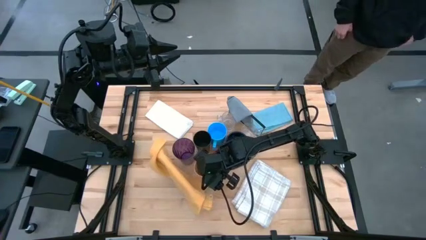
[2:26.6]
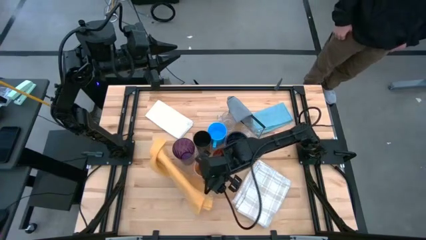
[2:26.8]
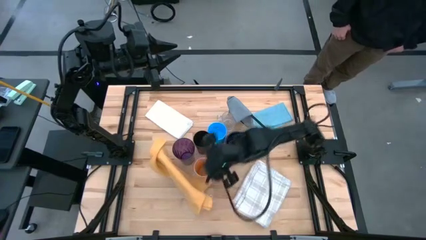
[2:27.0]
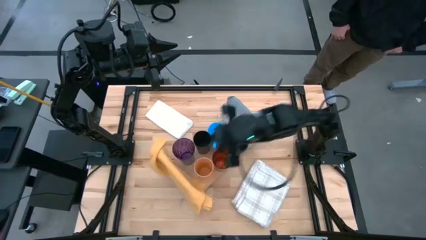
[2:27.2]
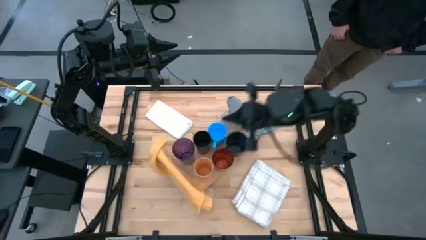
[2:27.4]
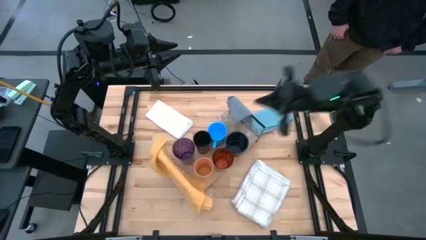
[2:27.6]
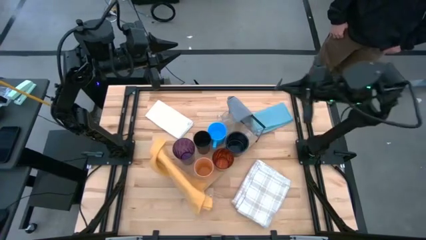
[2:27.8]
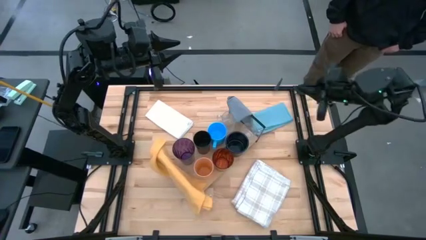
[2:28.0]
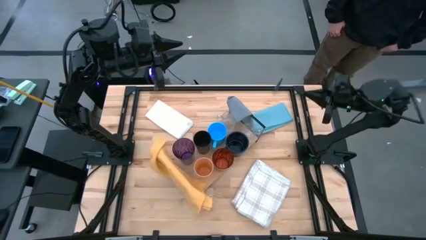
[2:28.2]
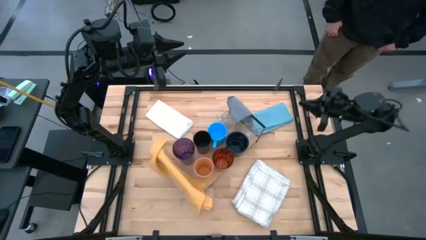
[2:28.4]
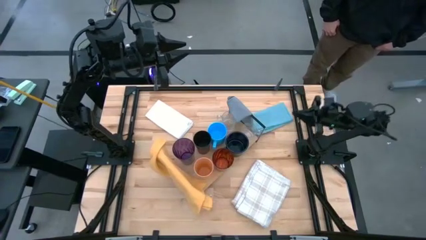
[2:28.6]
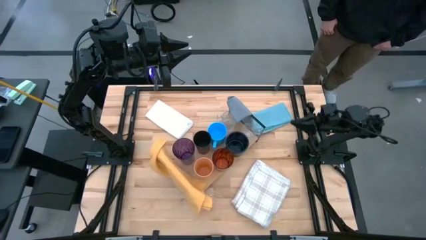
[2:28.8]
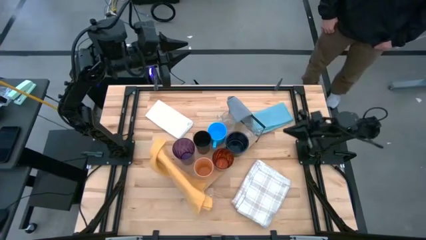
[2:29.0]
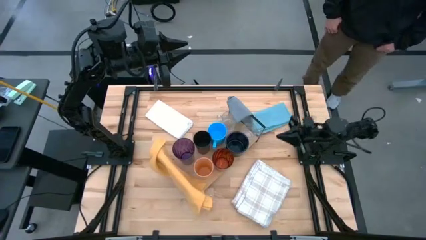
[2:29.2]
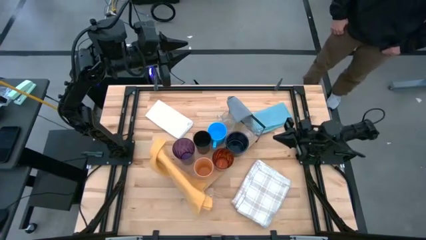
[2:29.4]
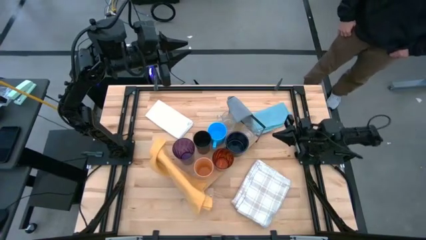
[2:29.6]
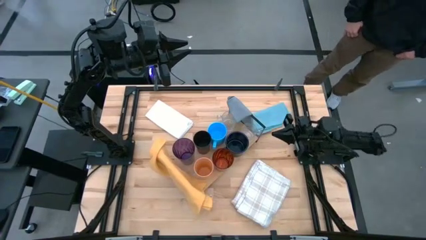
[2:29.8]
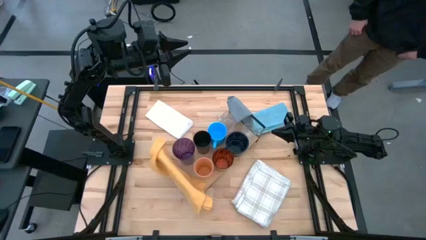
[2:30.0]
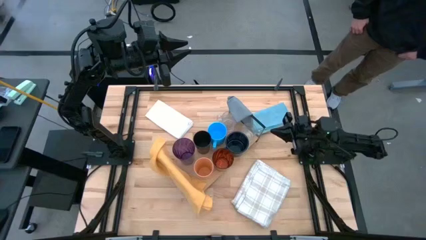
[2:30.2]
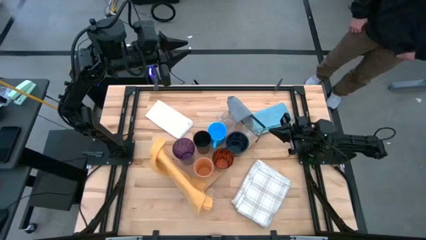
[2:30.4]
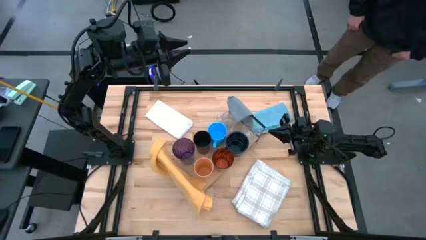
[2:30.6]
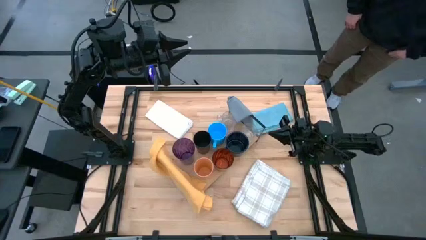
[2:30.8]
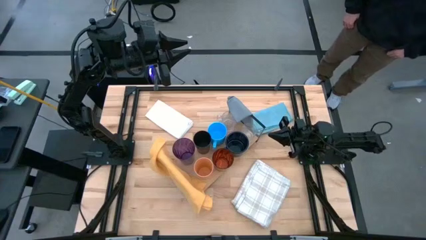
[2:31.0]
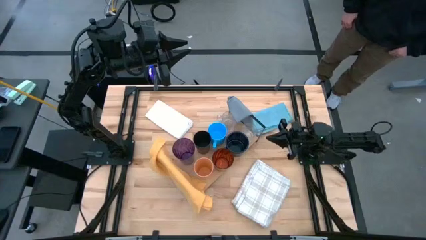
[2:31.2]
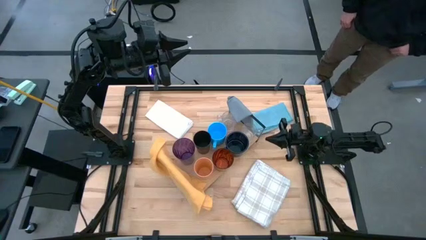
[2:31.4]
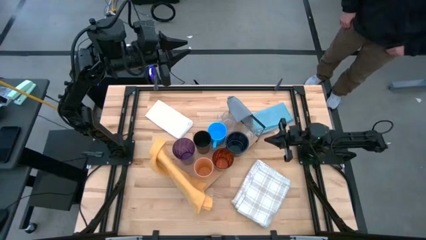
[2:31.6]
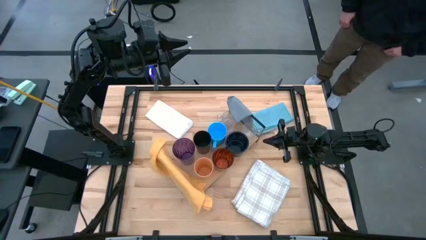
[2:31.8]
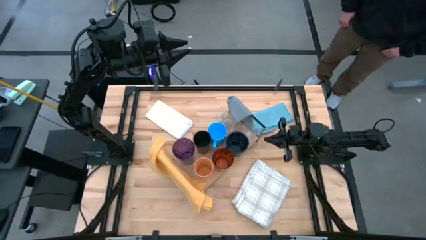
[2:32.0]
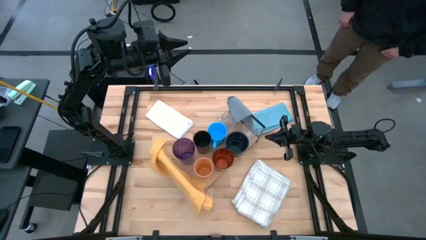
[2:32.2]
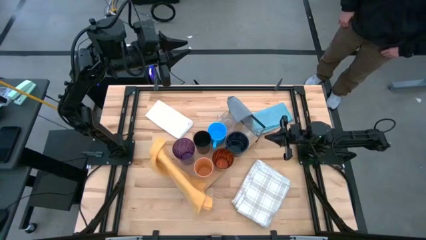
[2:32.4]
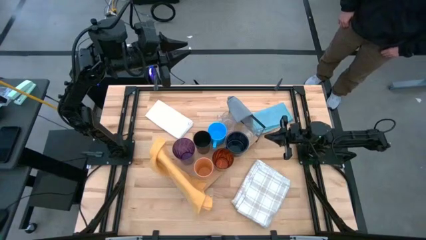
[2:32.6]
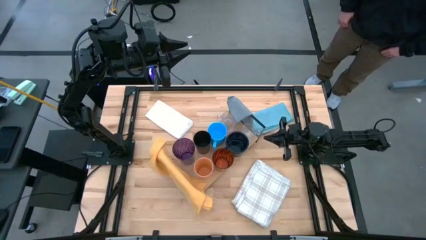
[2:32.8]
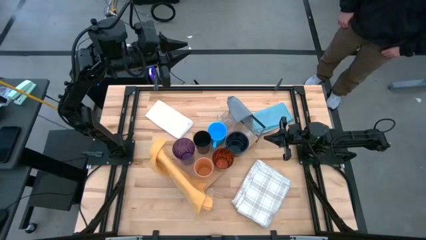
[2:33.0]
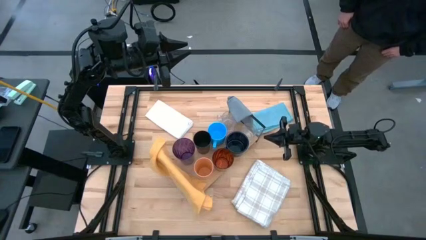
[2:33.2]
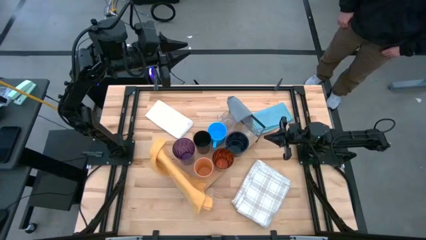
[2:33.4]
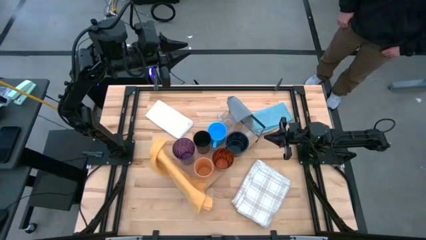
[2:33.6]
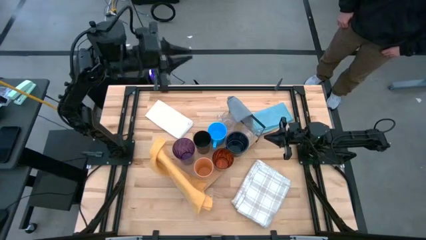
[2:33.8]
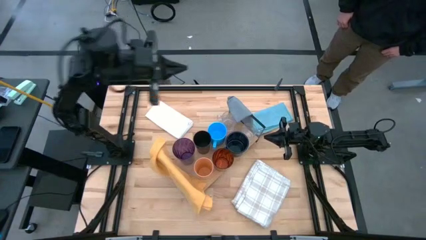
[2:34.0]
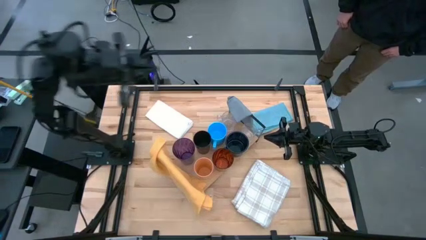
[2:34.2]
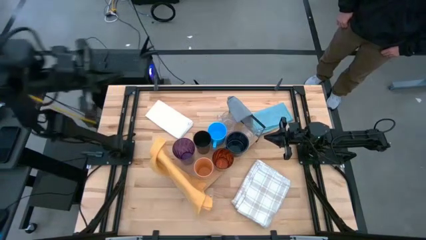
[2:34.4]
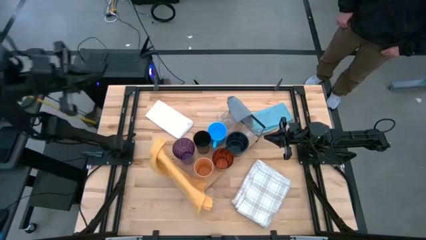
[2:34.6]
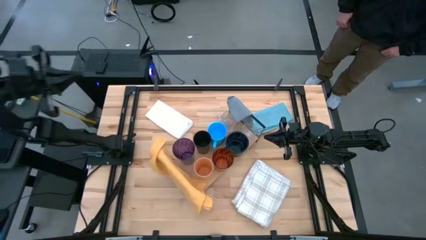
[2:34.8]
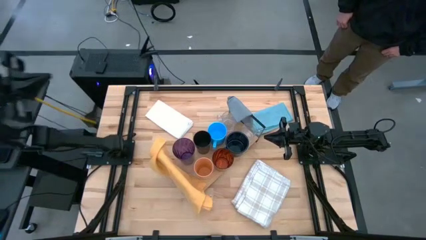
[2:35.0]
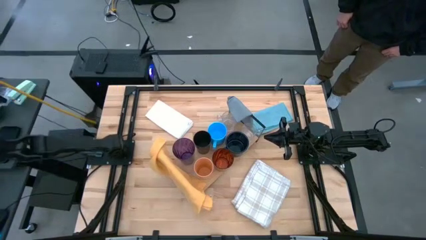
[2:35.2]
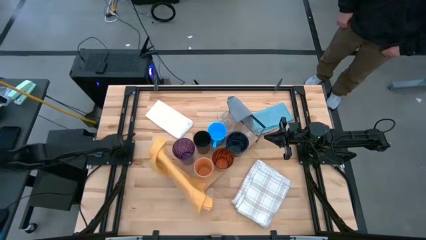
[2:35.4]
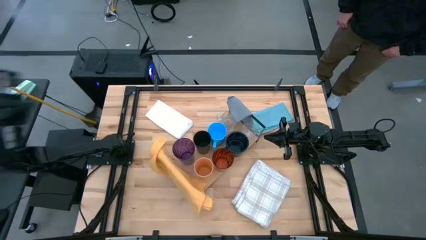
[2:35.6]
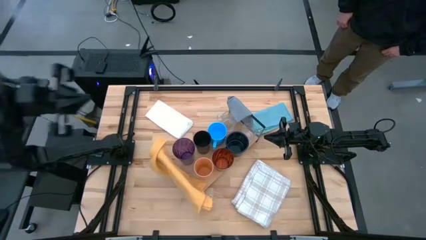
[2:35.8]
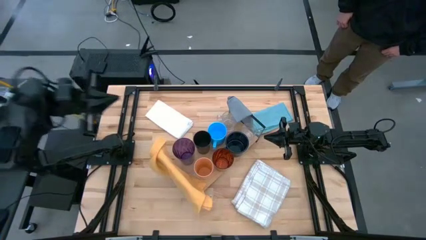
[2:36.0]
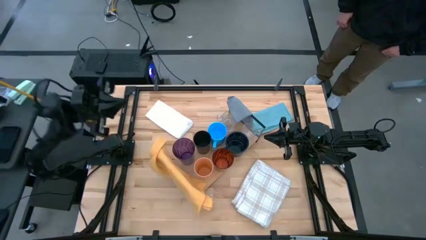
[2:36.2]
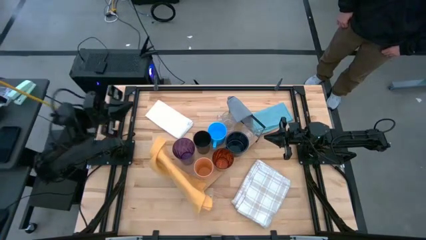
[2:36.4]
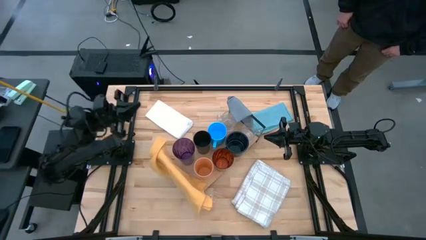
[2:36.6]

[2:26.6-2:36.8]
Task: Stack small to large cups/mugs on shelf
Return to Home Position
